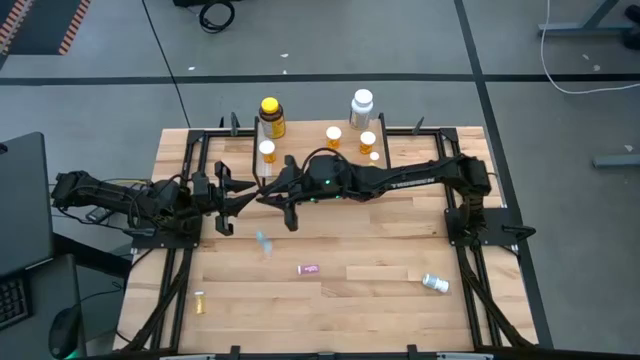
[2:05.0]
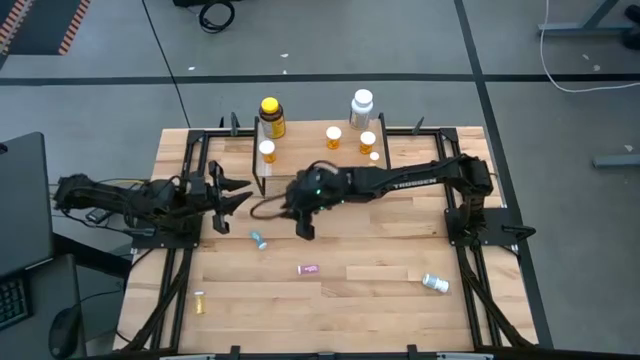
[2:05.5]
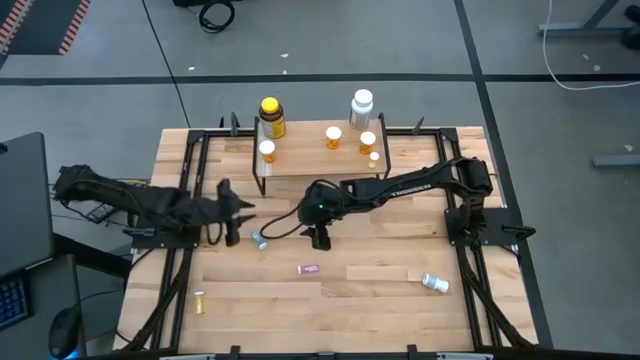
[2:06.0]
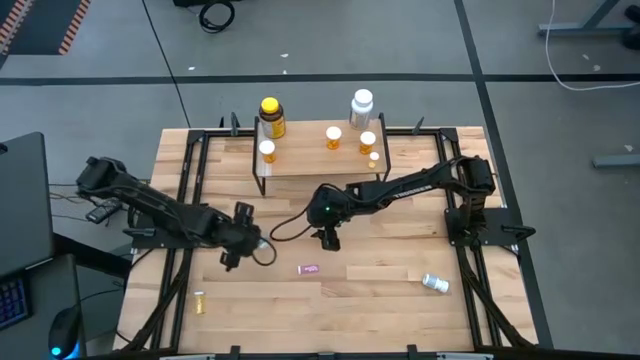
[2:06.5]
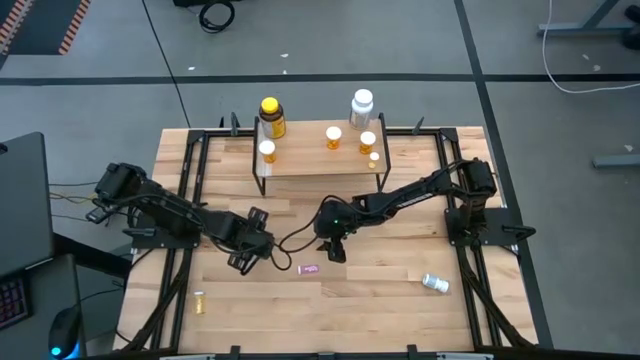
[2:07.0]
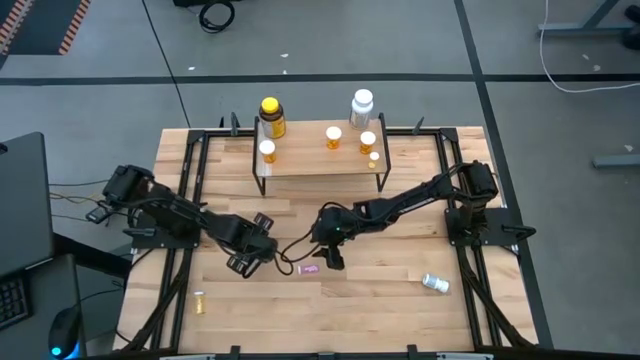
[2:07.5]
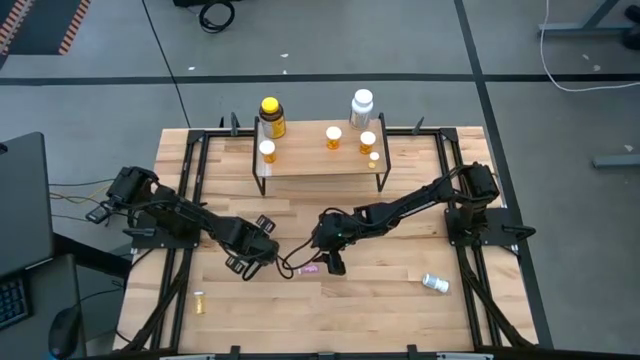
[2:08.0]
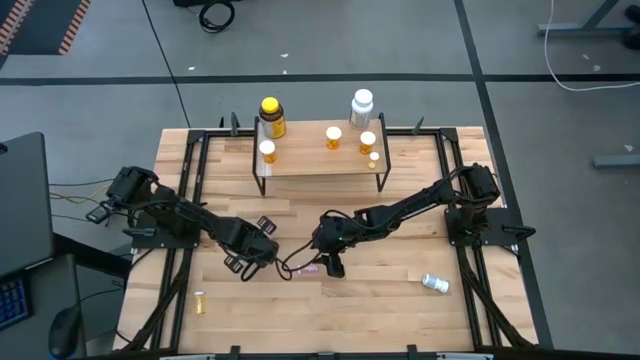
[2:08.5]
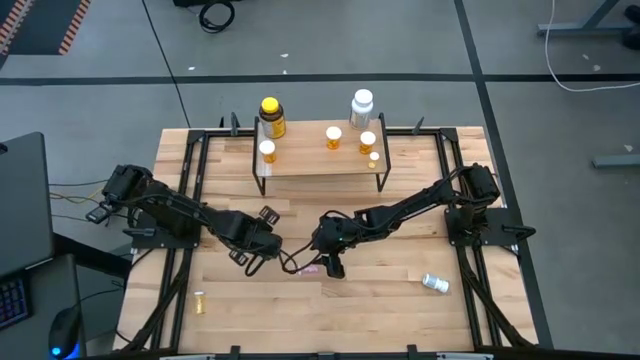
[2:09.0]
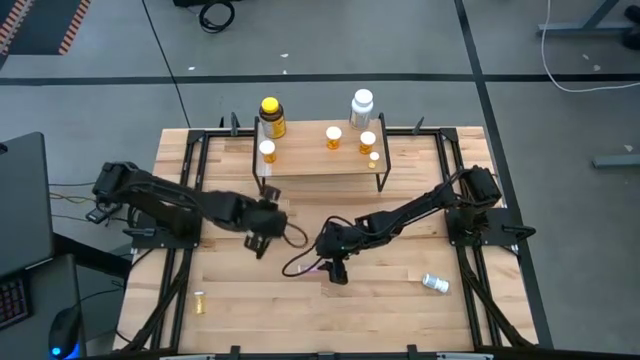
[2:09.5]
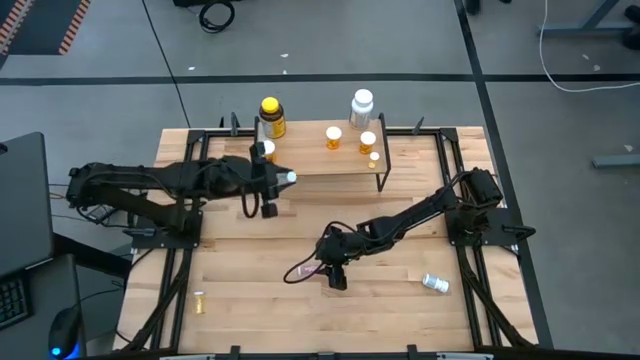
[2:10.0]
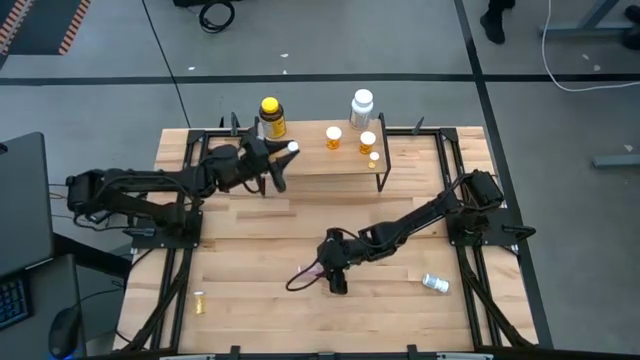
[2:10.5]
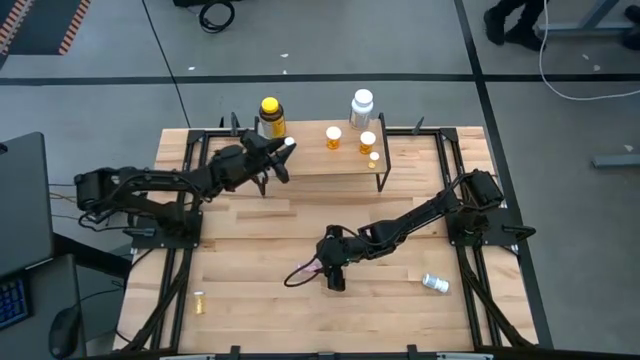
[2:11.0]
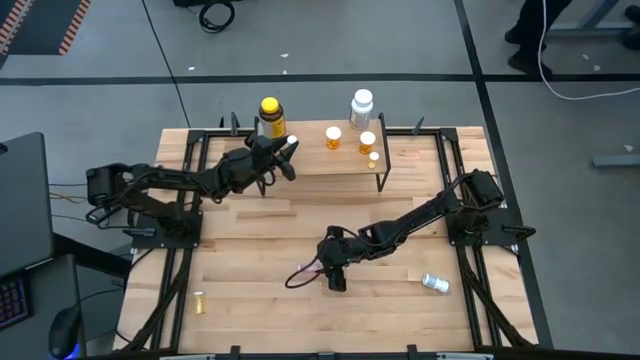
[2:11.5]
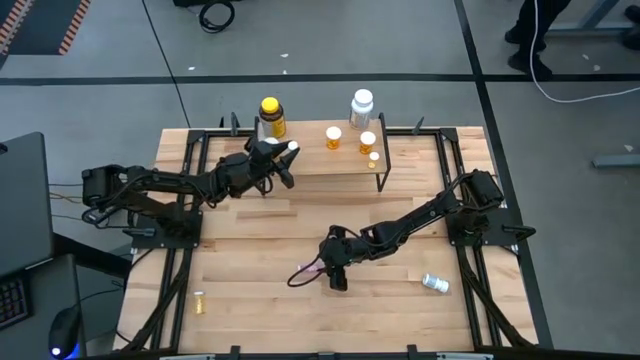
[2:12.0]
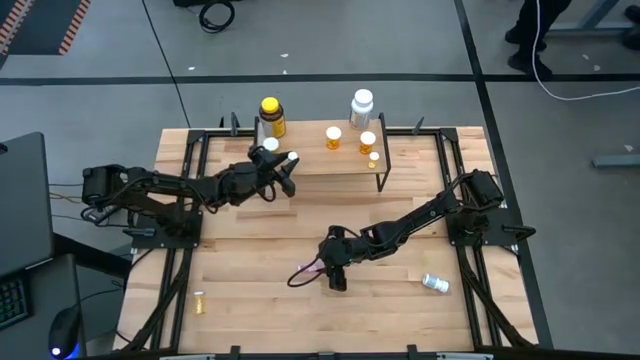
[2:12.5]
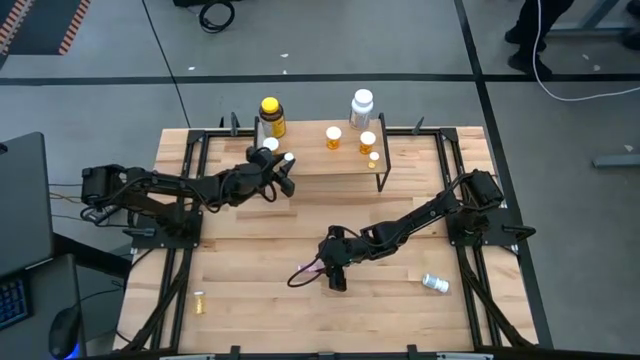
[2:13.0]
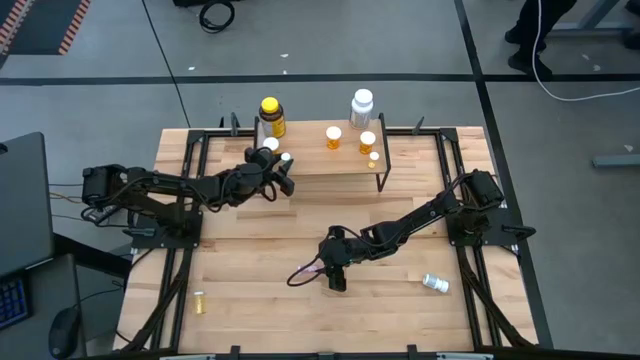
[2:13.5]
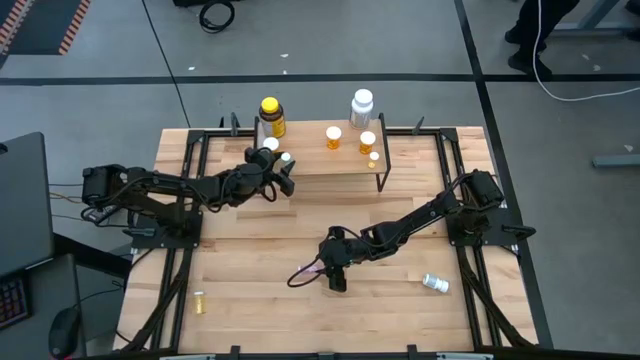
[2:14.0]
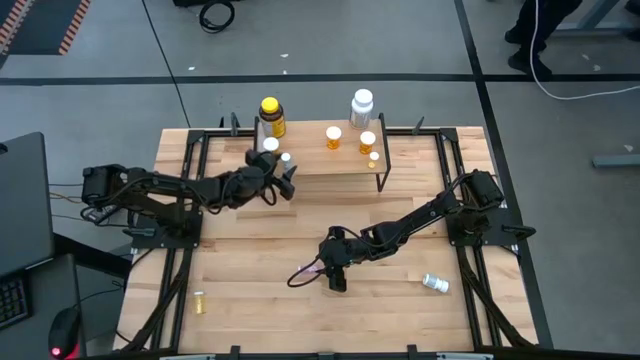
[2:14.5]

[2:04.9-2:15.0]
Task: Pick and place medicine bottles onto shelf by color
Put the blue pill bottle on the shelf

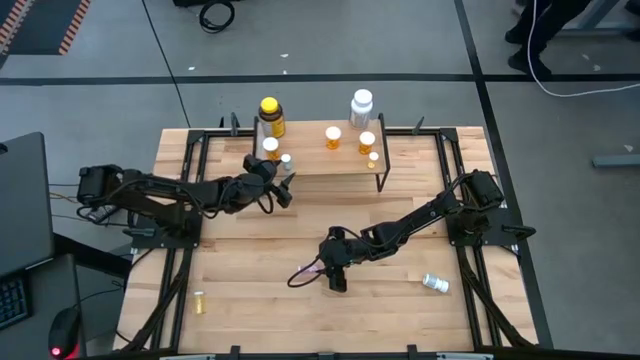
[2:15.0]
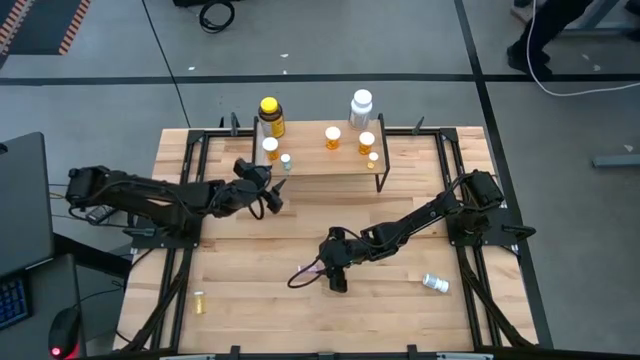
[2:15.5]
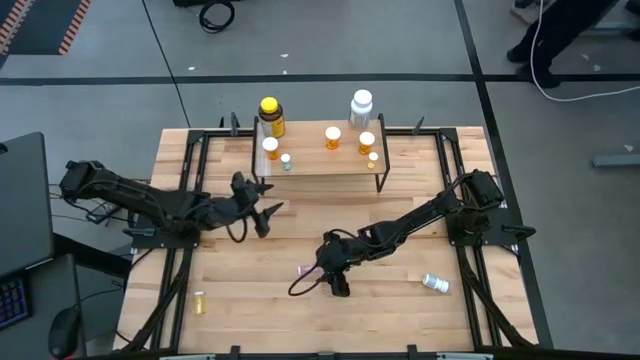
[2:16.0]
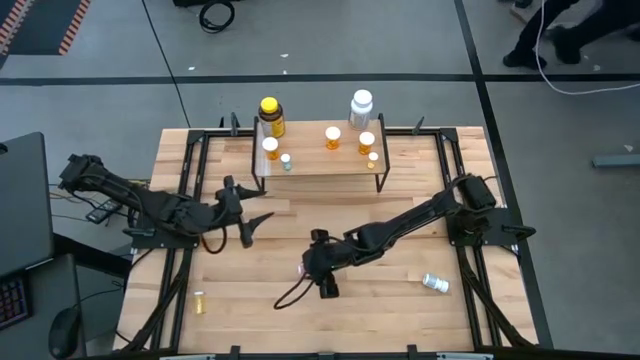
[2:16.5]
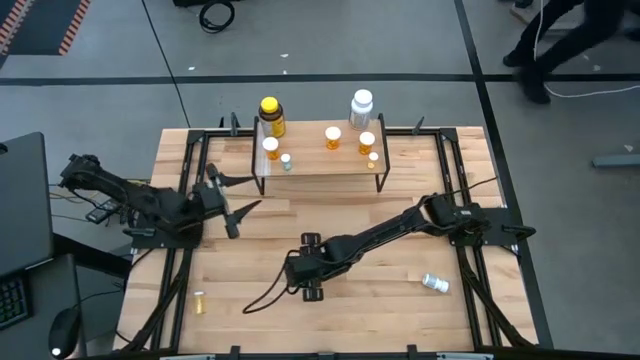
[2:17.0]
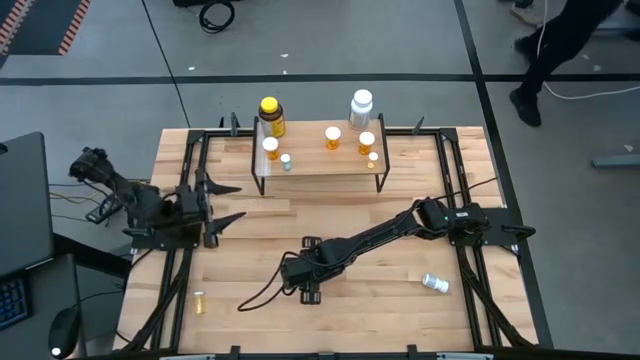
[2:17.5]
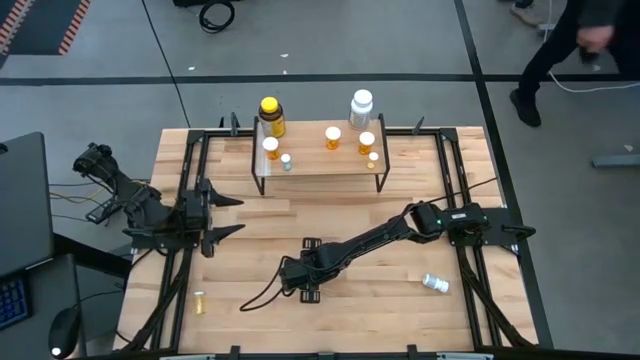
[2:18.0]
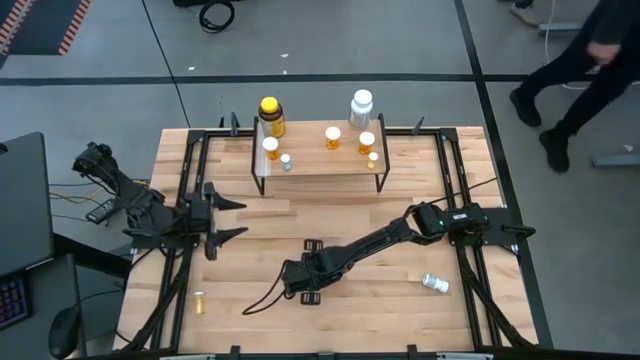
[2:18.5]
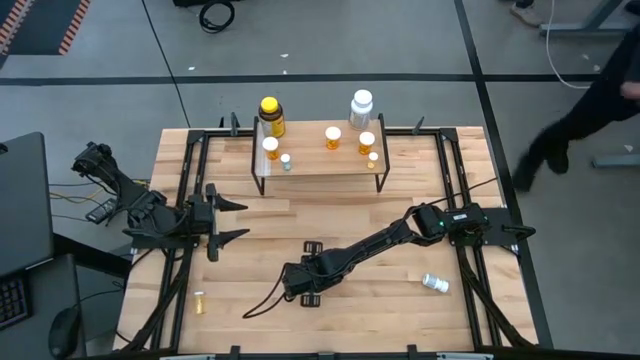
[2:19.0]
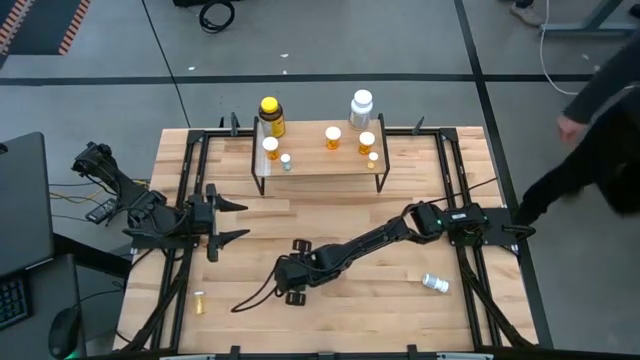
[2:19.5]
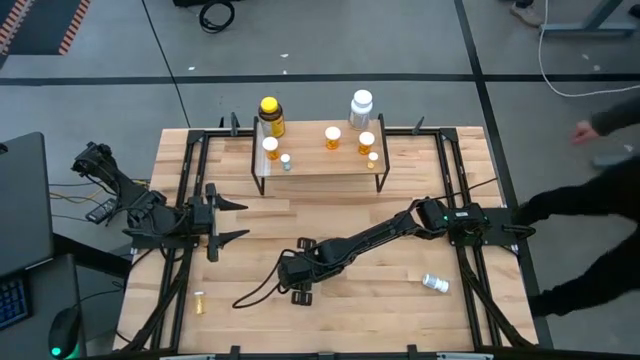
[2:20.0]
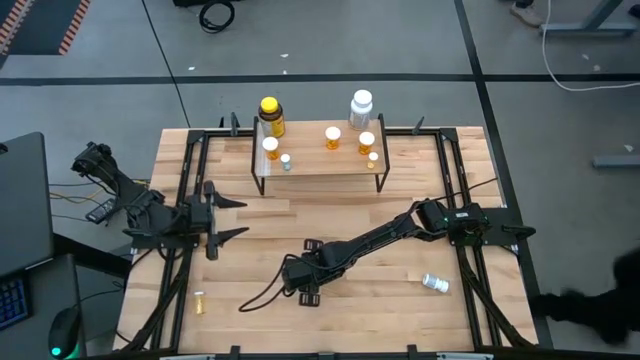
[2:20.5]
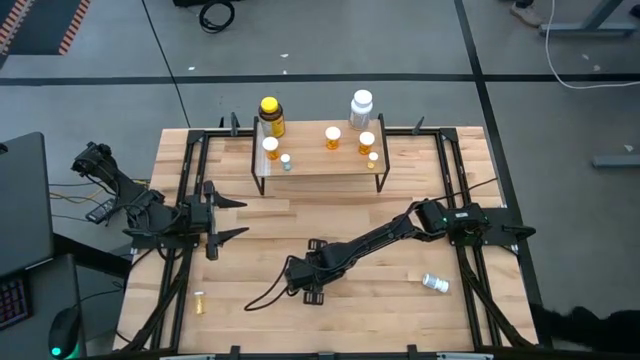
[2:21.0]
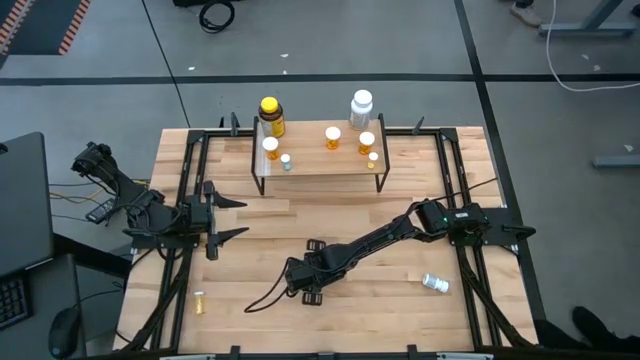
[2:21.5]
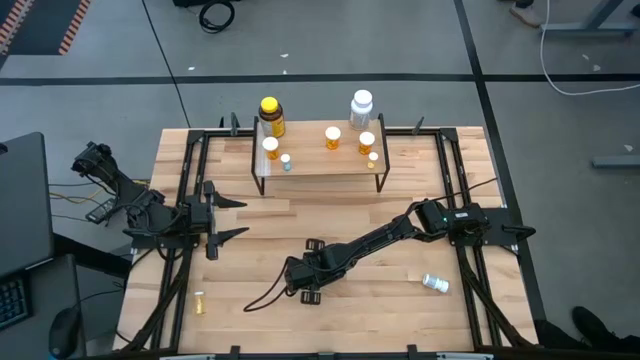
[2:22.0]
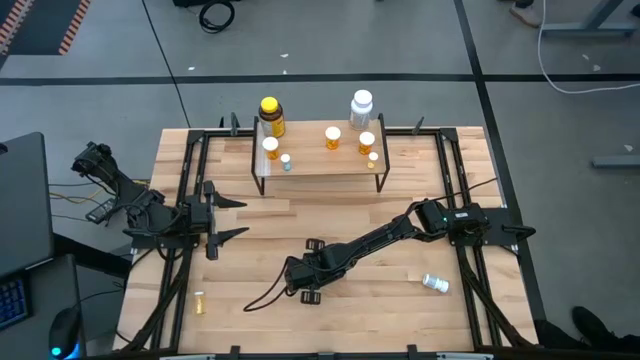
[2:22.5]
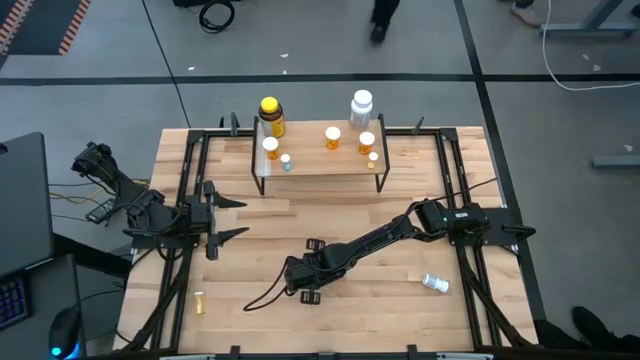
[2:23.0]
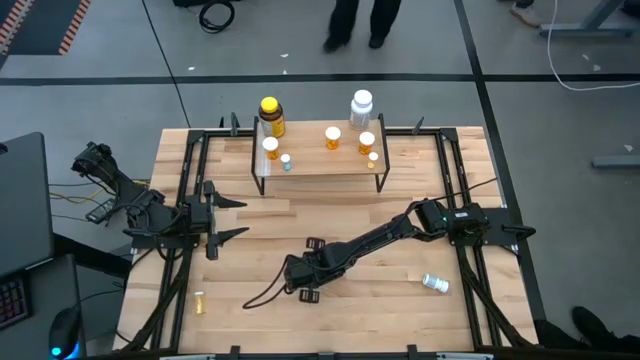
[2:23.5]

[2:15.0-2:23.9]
Put the pink pill bottle on the shelf

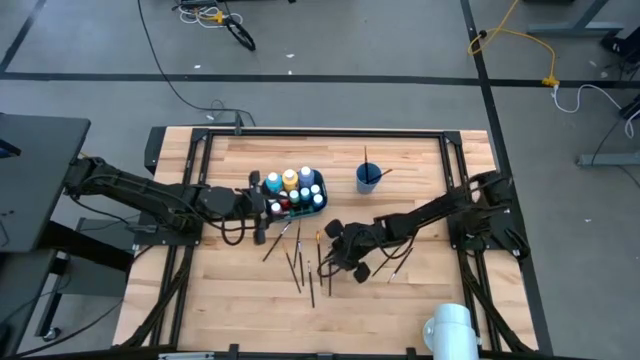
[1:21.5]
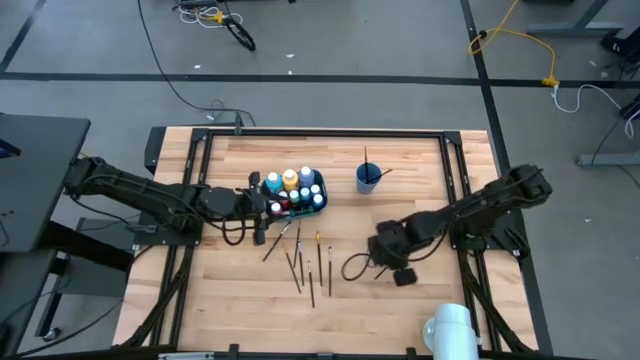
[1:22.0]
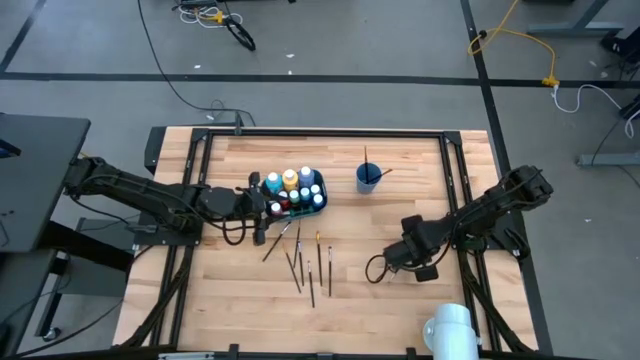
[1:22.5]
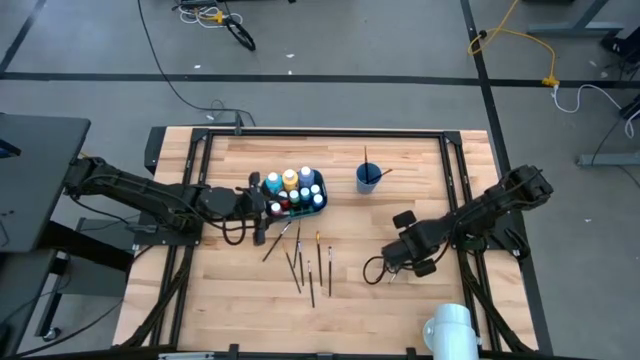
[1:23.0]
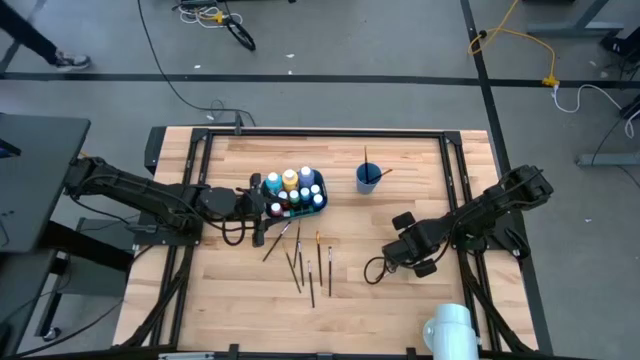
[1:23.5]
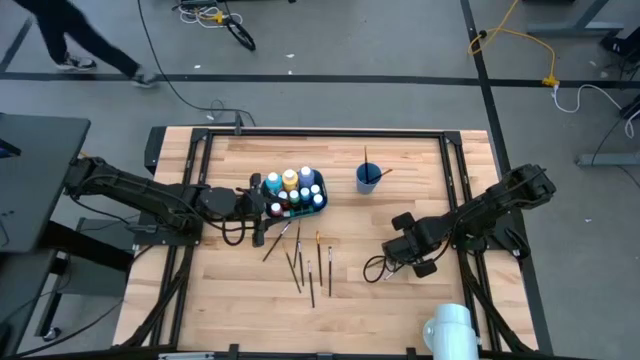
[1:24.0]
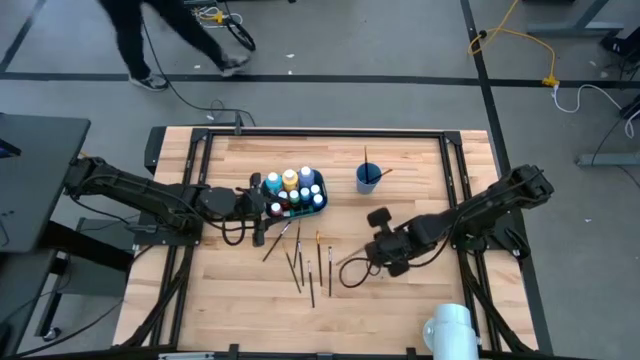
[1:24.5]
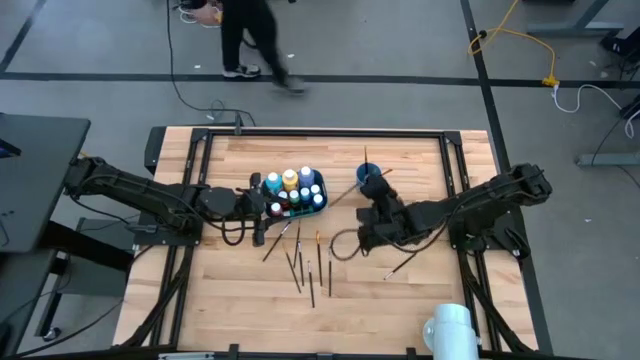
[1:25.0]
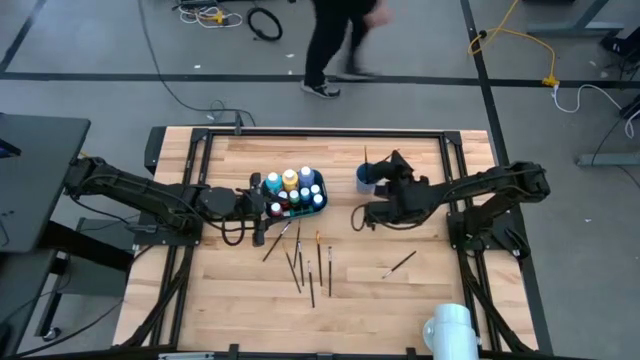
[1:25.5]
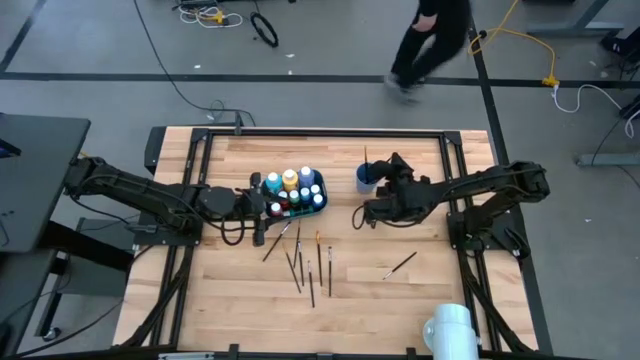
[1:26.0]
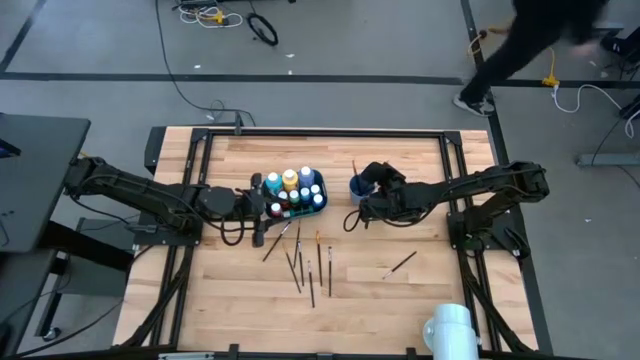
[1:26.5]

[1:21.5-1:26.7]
Task: Pick & Place Paint Supplies
Put the orange paint brush into the blue cup
